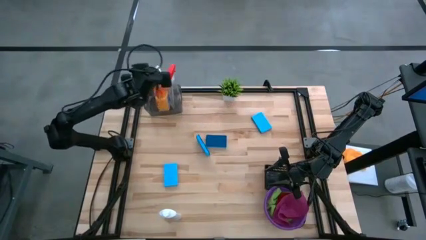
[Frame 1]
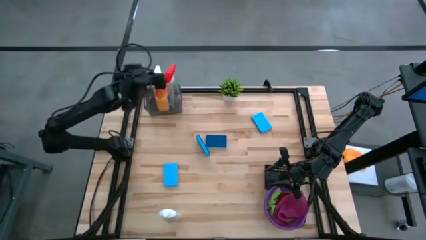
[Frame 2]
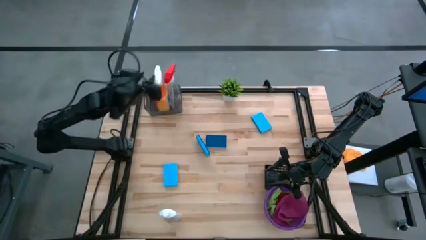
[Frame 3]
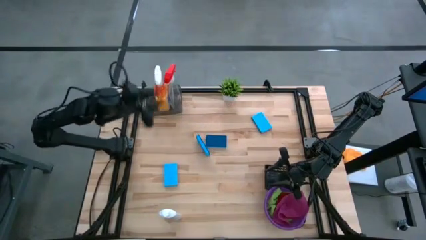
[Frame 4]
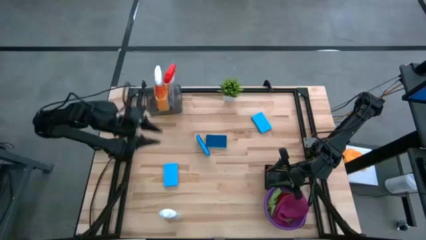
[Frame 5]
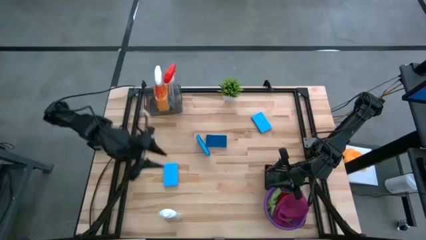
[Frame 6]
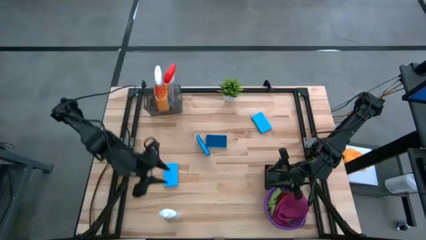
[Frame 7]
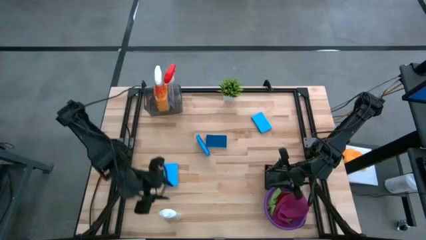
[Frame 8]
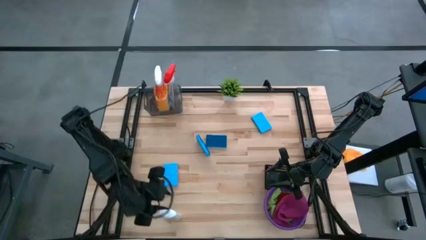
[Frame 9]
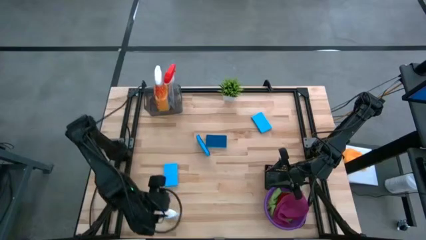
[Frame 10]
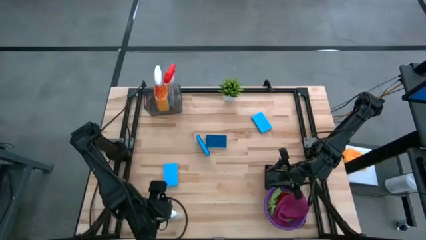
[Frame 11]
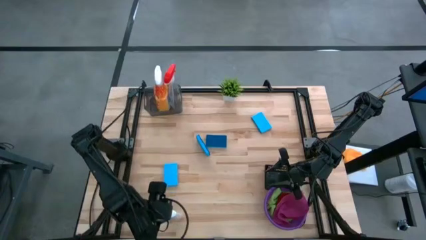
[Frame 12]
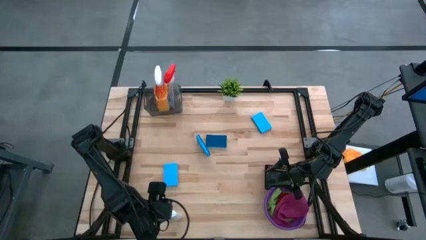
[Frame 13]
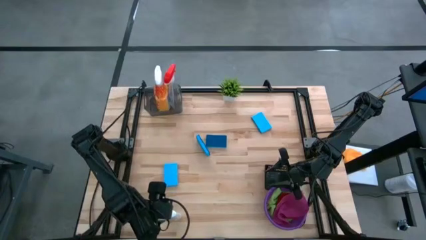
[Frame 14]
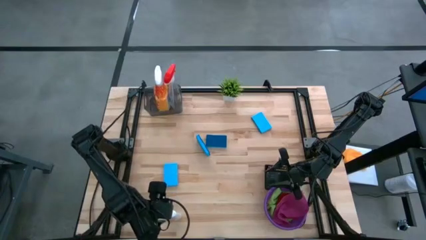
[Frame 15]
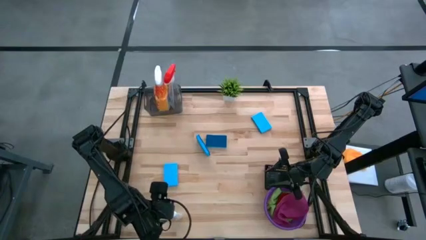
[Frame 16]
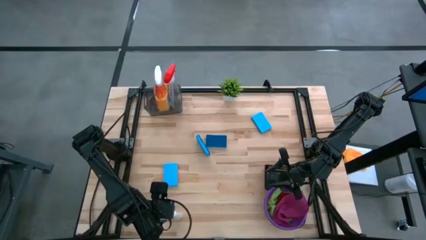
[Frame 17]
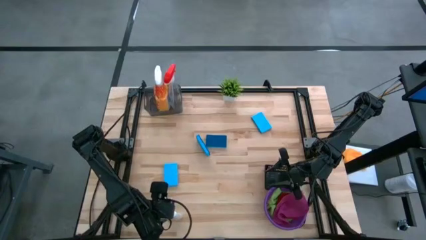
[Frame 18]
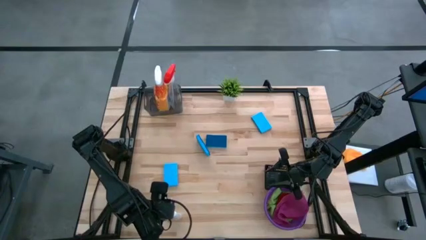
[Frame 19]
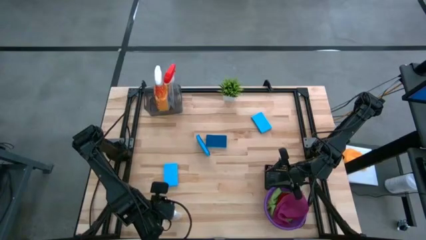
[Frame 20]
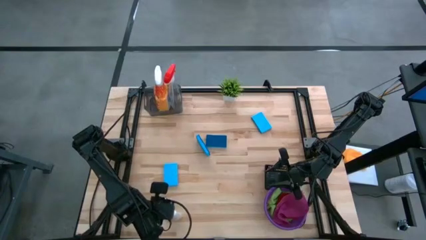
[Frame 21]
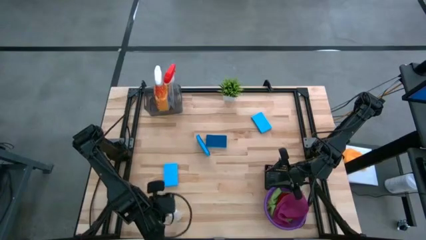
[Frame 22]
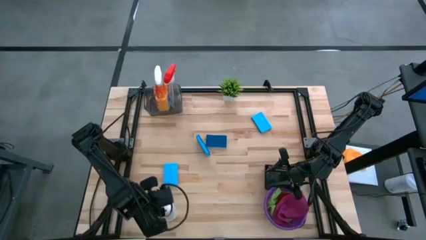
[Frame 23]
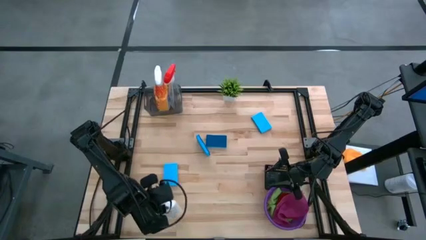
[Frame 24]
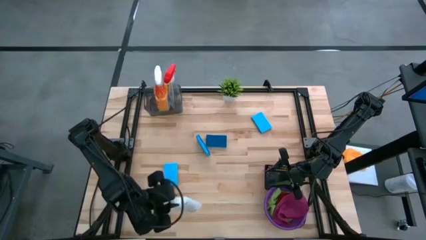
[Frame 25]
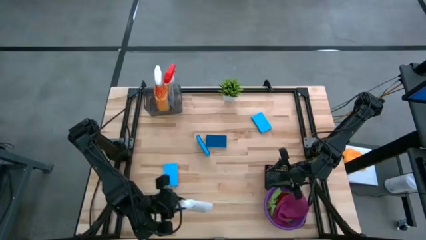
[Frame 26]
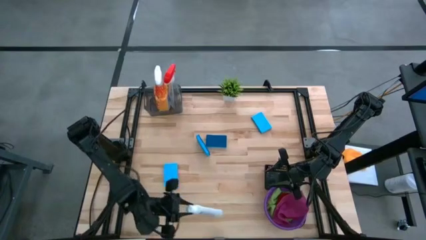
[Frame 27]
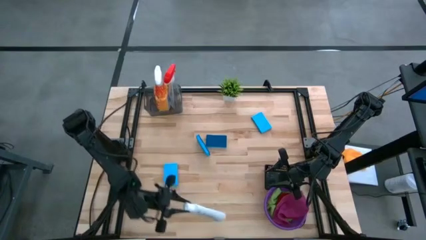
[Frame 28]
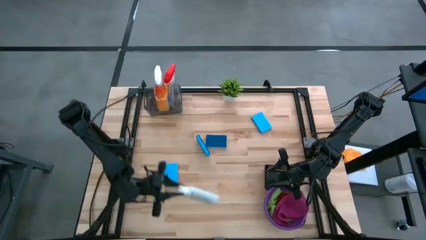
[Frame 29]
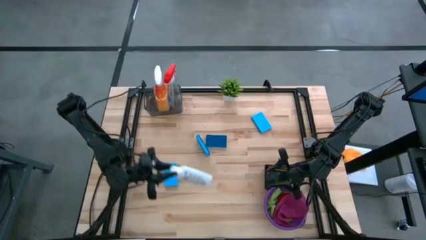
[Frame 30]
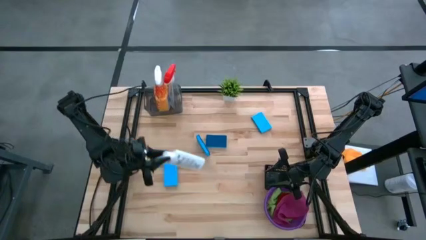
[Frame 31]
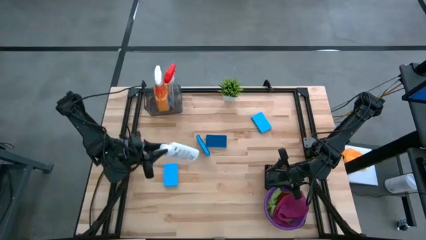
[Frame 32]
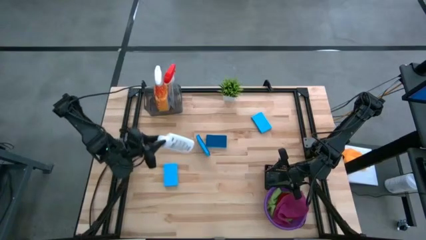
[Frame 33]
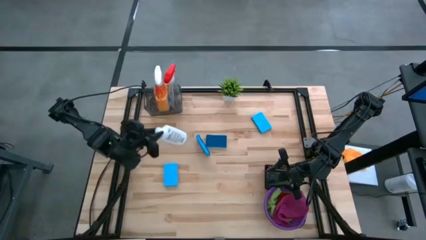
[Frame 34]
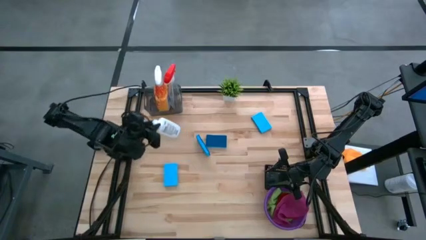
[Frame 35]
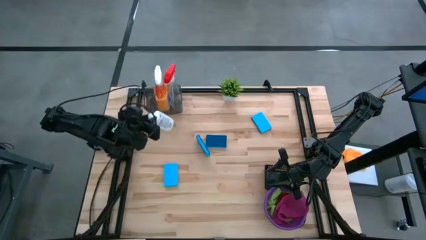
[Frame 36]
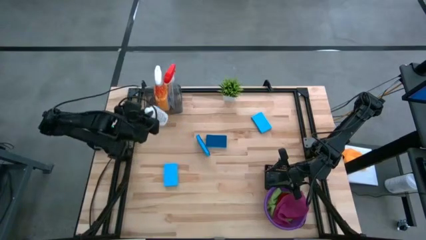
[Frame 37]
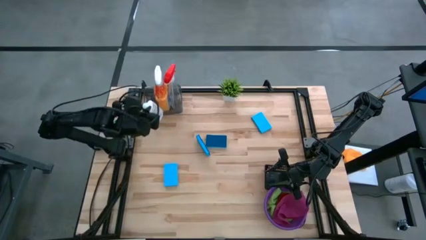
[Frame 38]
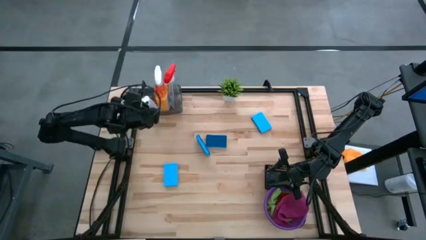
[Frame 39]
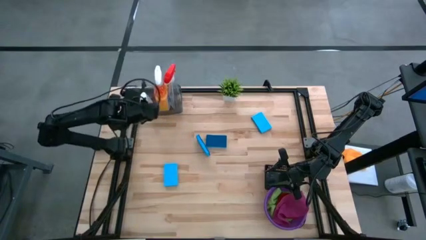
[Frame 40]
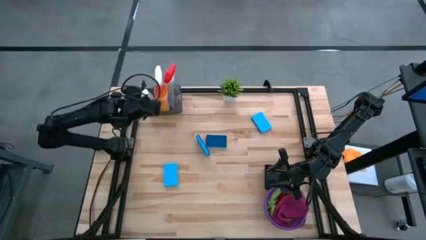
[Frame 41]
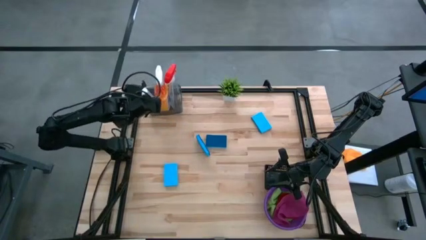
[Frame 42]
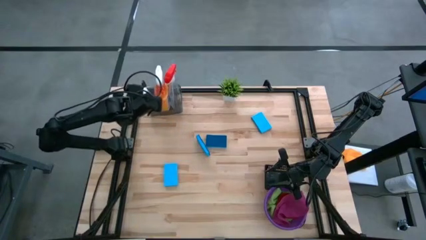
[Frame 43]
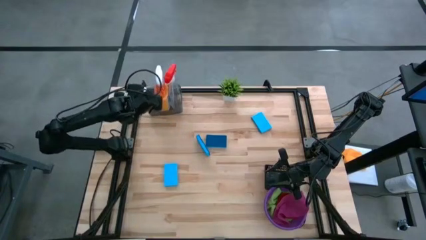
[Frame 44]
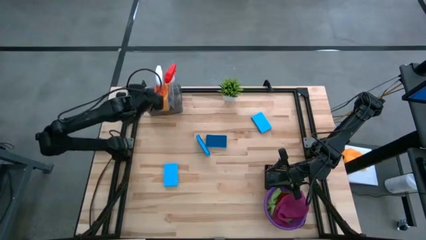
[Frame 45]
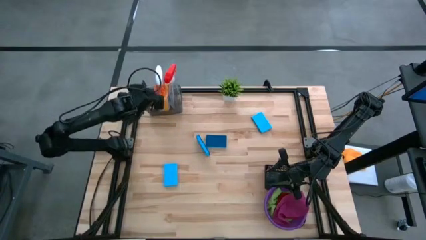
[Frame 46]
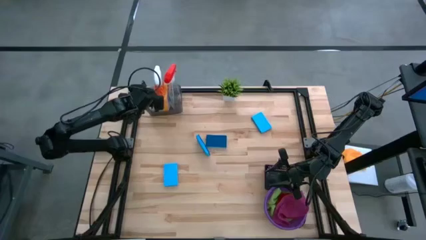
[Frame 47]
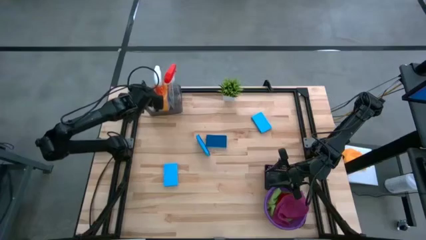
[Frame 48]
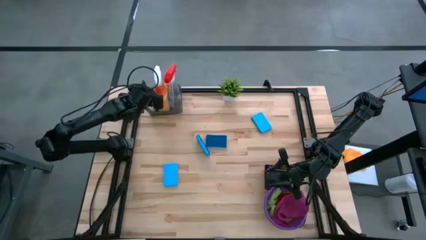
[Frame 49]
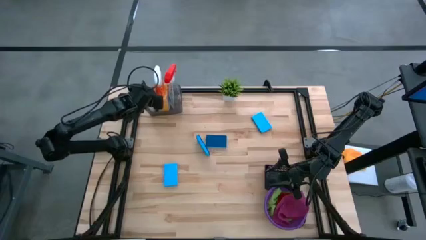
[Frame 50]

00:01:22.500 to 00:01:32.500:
Task: Pick & Place Kitchen Items
Put the white plastic restorer bottle into the gray bin

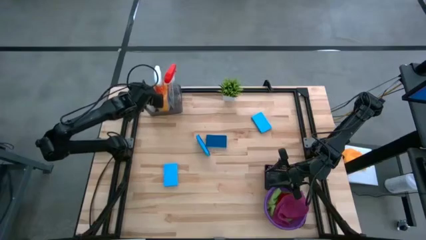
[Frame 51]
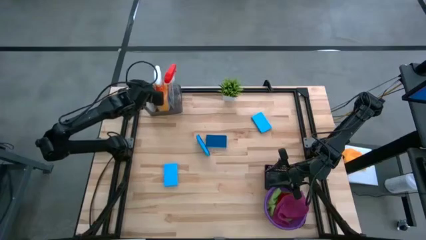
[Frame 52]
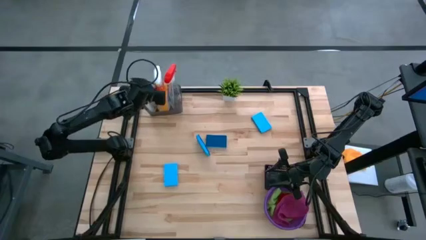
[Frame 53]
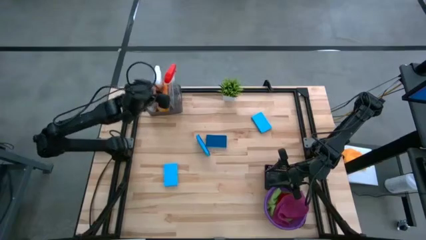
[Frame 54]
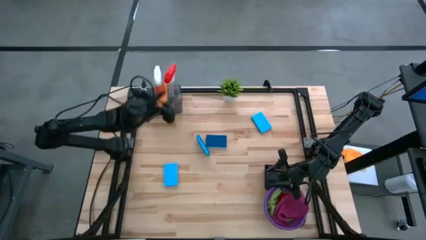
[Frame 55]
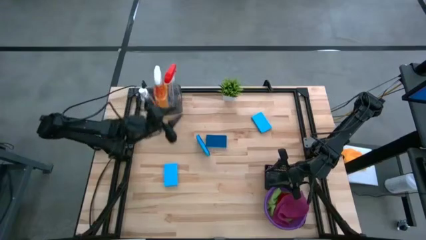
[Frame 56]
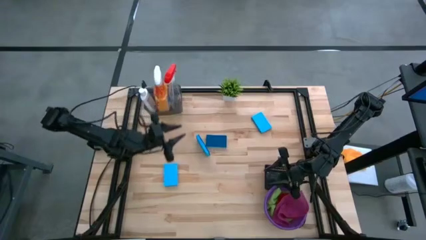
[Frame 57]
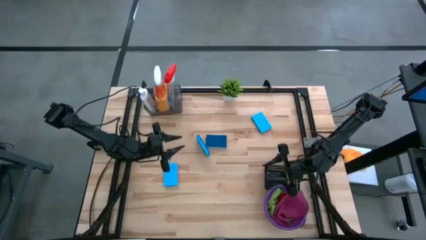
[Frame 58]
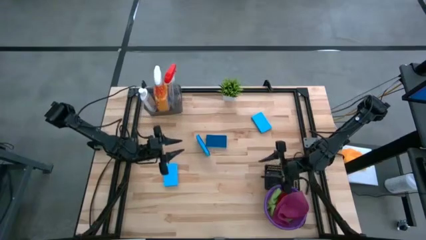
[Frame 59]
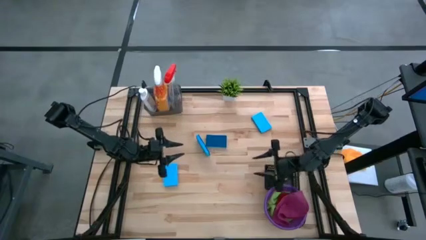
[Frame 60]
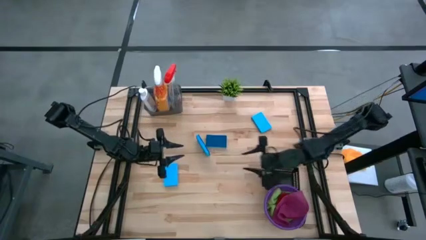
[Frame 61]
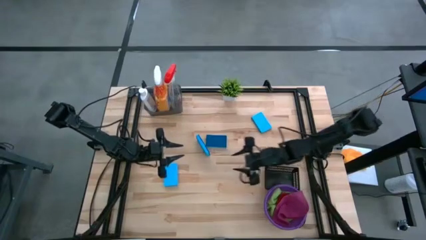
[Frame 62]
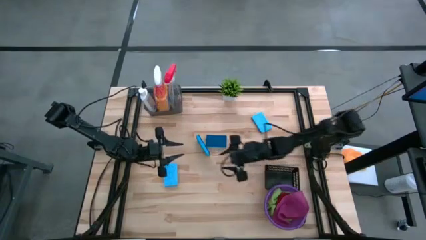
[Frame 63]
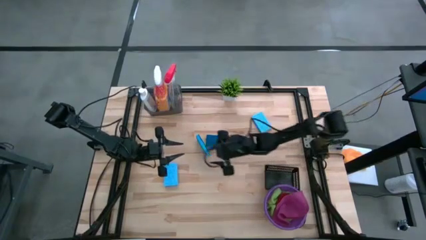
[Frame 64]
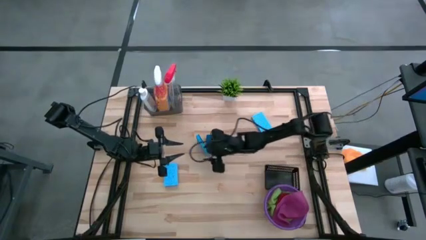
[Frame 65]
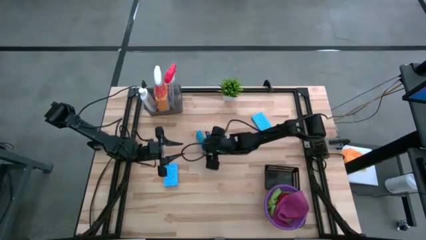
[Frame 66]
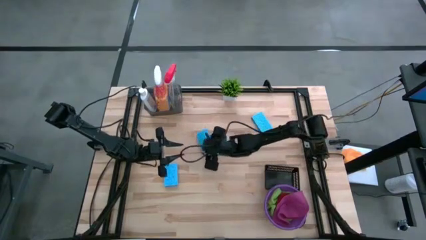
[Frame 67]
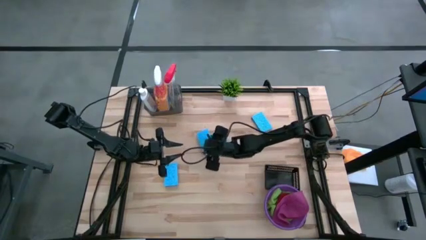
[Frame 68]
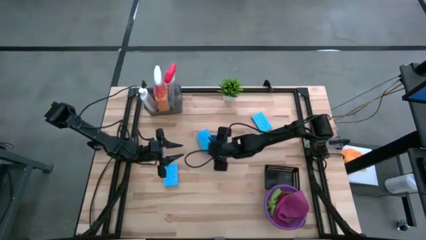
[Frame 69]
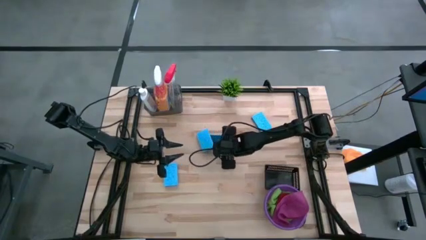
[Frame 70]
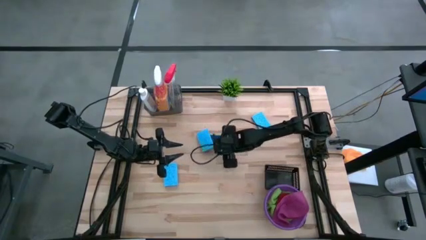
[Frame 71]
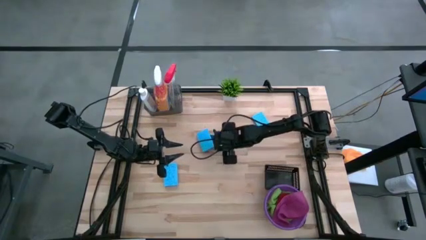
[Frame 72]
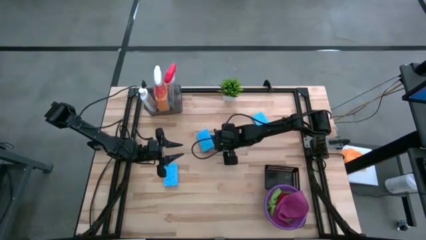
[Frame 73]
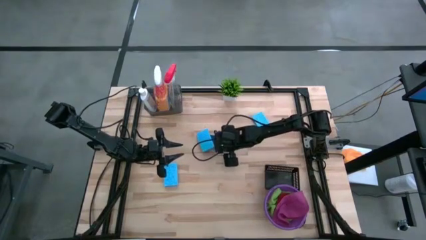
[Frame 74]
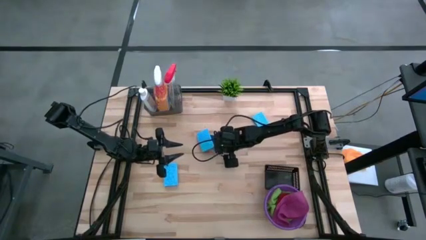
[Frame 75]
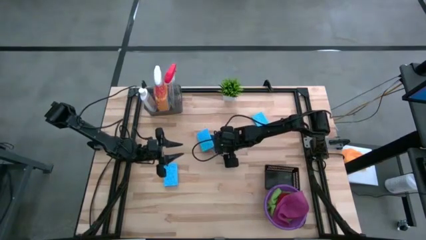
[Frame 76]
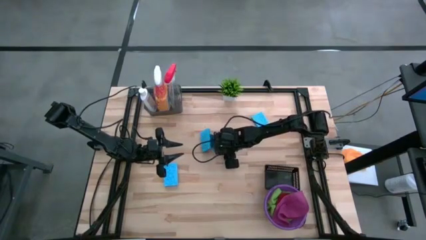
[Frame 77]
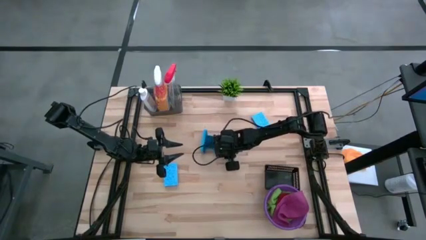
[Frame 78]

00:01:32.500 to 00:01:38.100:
Put the blue sponge into the black bin

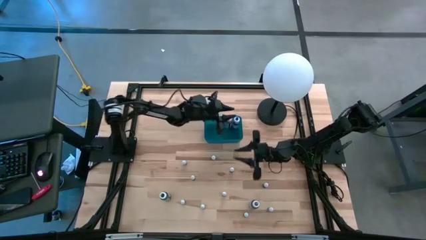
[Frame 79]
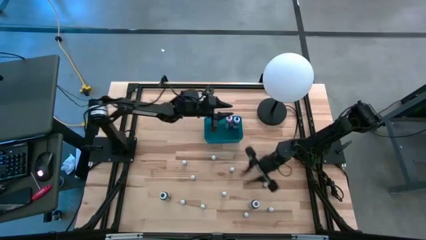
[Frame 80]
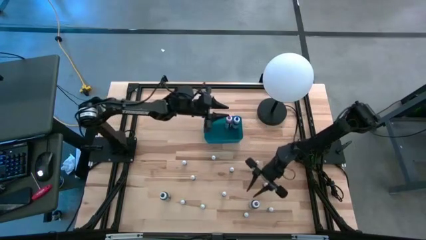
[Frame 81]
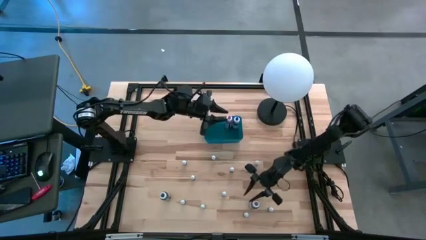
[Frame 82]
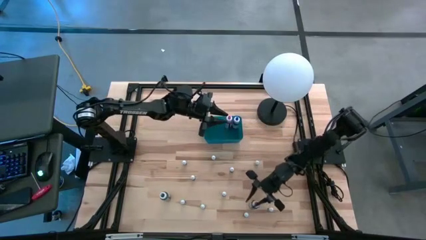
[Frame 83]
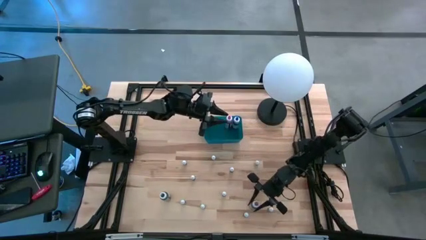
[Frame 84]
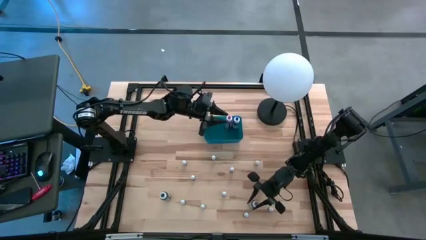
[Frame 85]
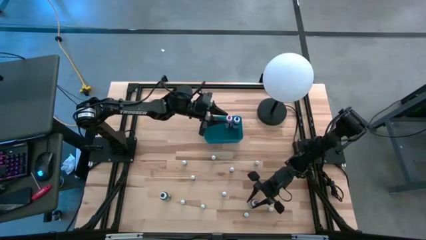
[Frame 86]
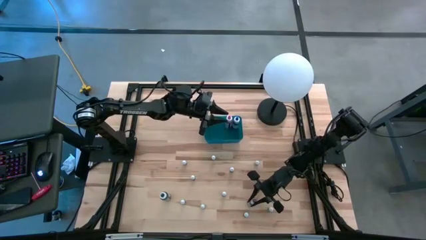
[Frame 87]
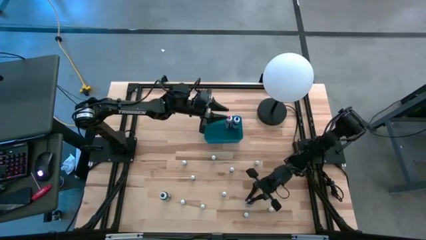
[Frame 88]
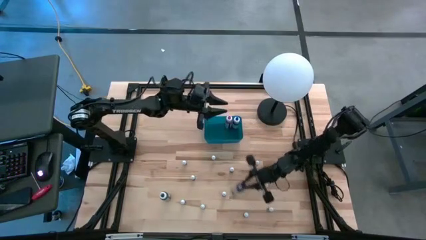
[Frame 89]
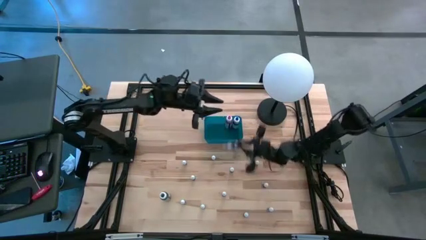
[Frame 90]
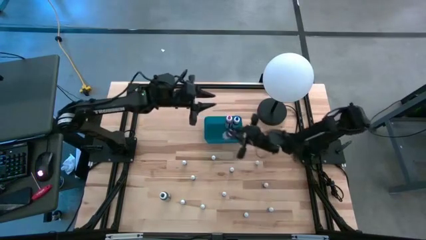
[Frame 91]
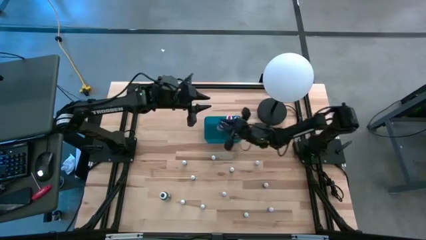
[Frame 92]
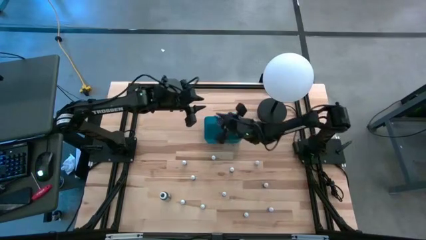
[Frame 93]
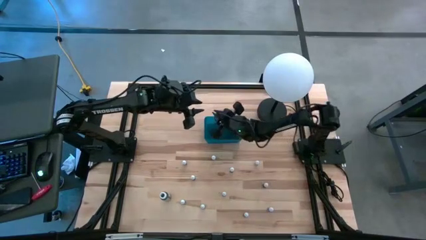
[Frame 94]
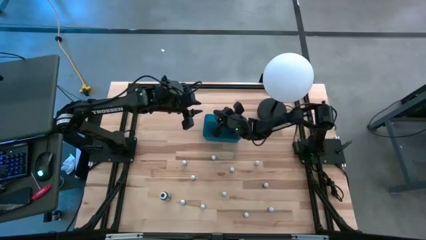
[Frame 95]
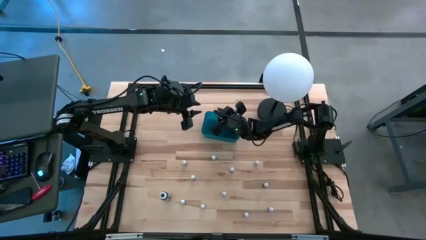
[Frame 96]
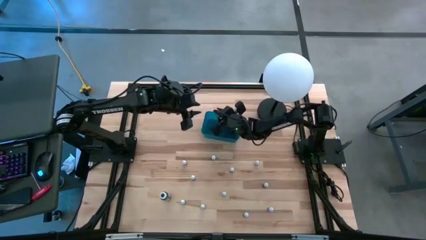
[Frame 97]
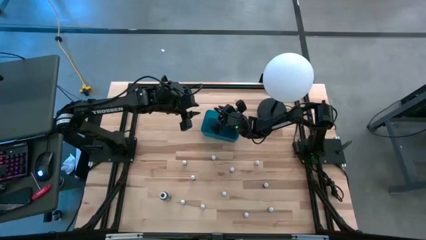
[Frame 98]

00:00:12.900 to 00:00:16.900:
Task: Pick & Place food coloring
Put the large purple food coloring bottle into the blue bin
